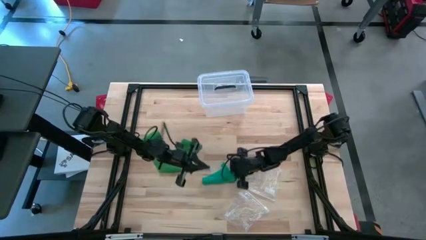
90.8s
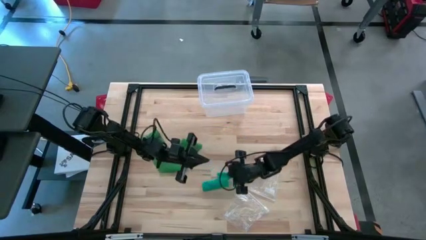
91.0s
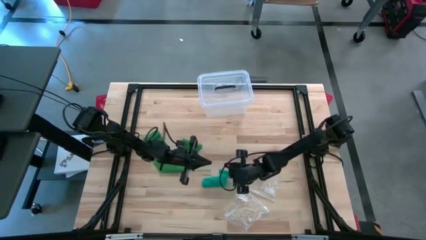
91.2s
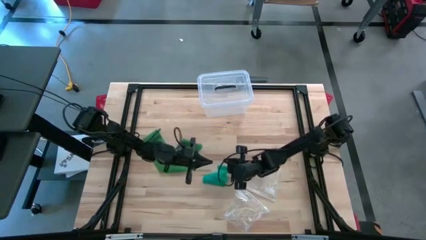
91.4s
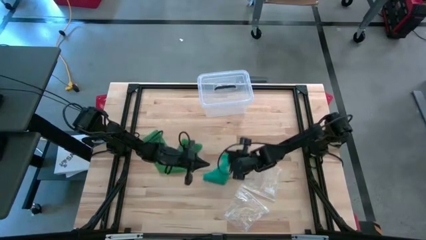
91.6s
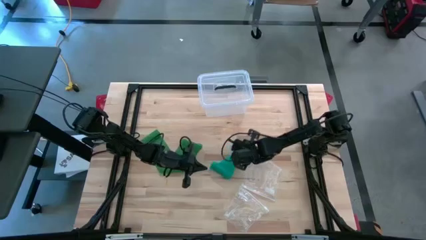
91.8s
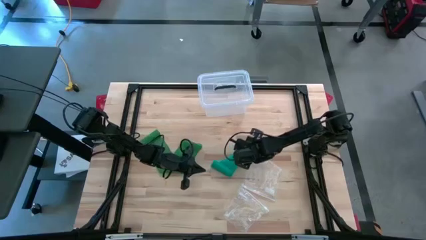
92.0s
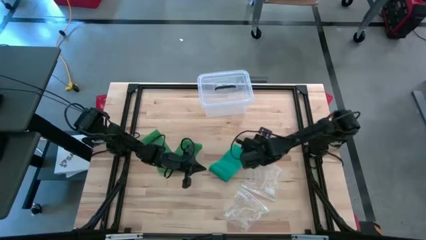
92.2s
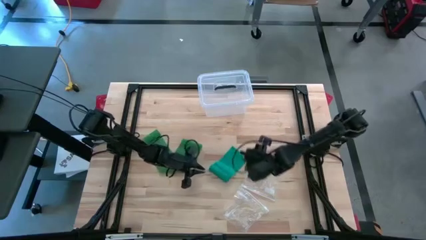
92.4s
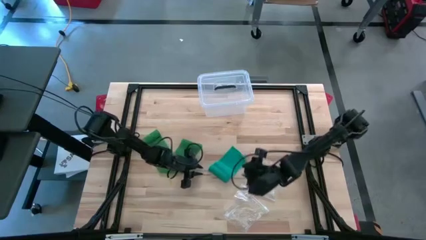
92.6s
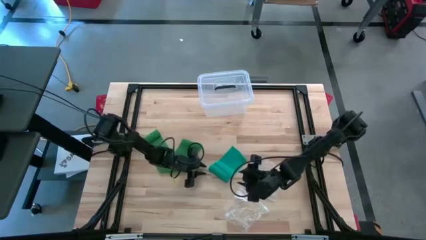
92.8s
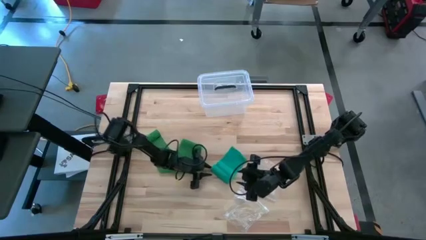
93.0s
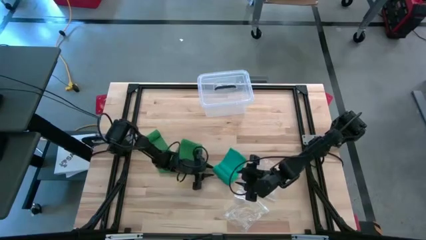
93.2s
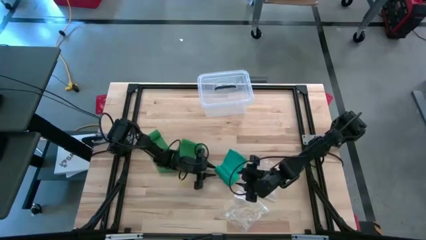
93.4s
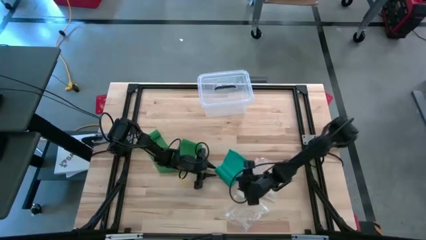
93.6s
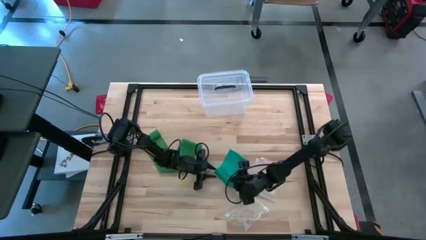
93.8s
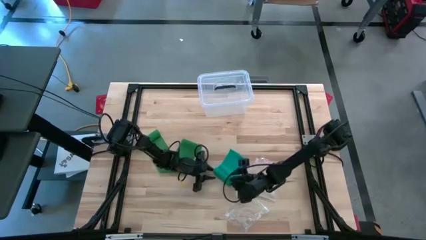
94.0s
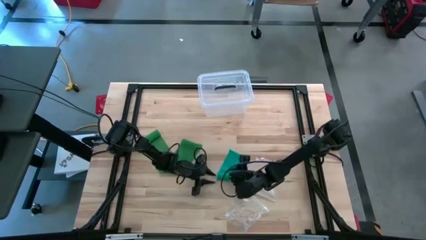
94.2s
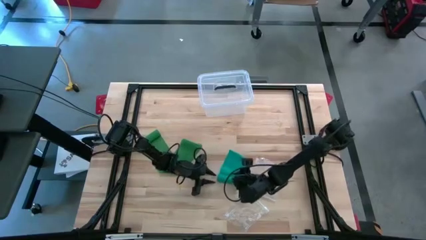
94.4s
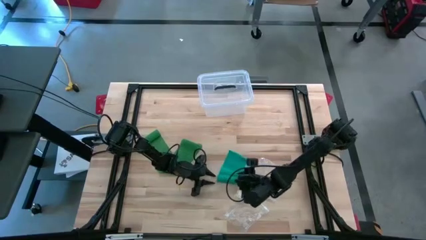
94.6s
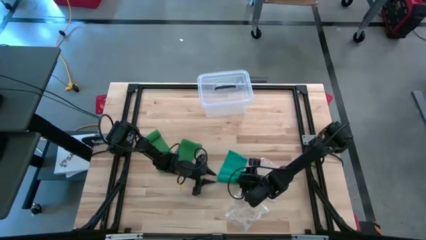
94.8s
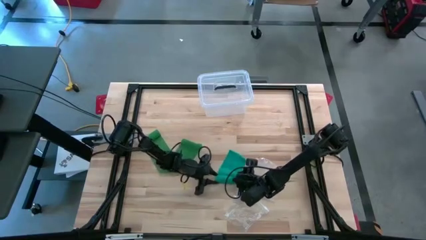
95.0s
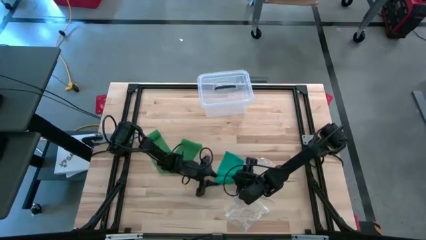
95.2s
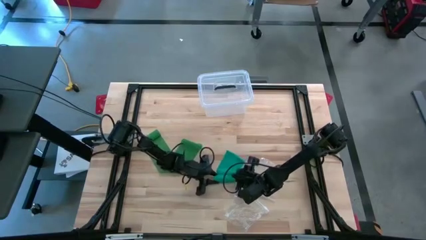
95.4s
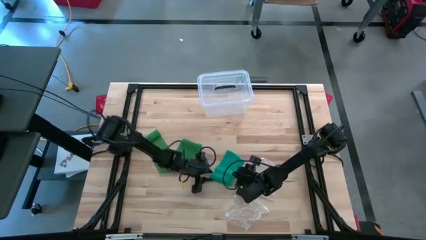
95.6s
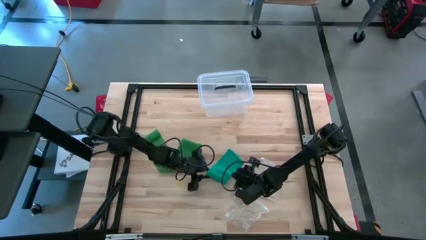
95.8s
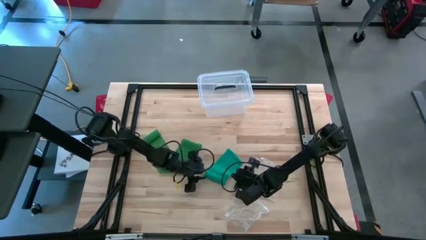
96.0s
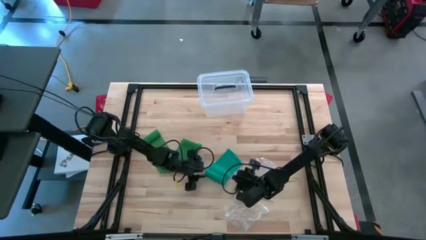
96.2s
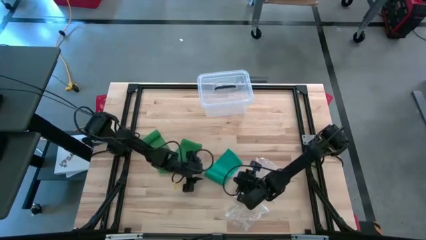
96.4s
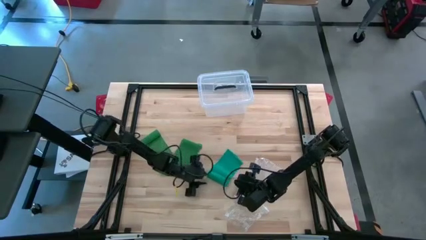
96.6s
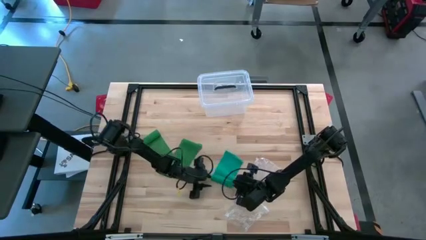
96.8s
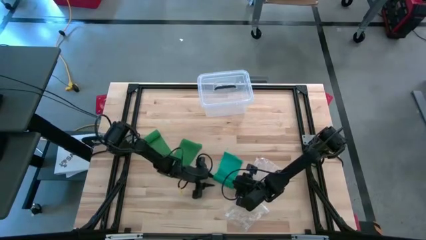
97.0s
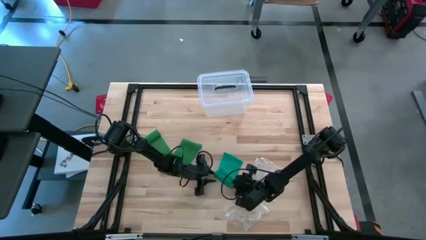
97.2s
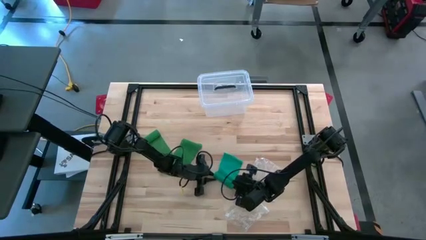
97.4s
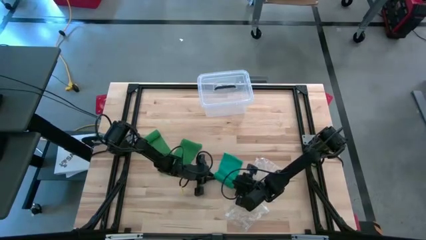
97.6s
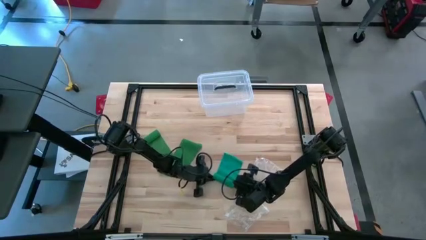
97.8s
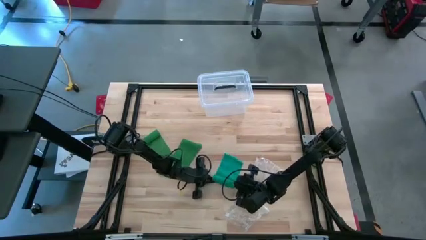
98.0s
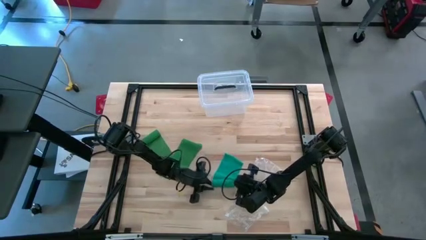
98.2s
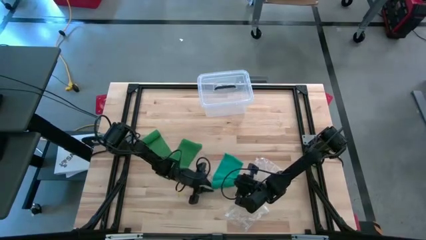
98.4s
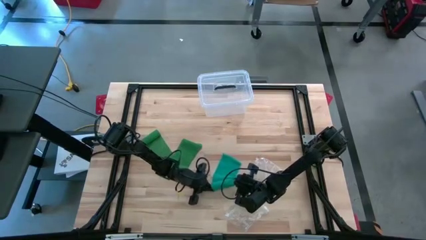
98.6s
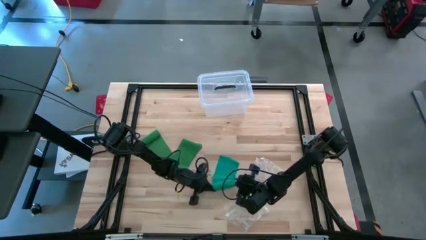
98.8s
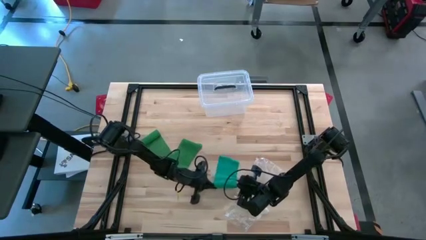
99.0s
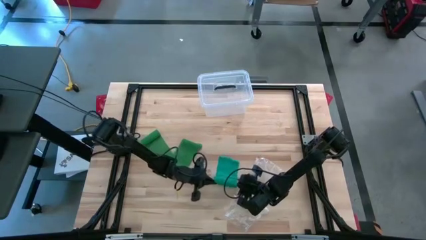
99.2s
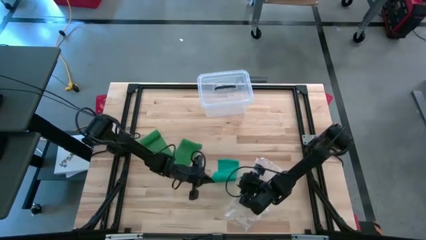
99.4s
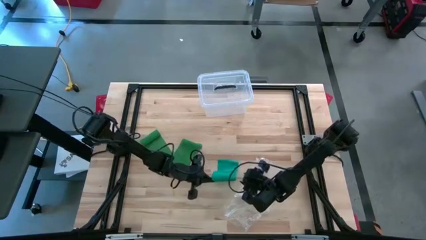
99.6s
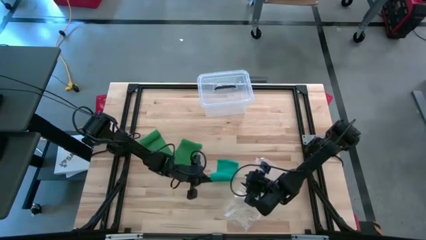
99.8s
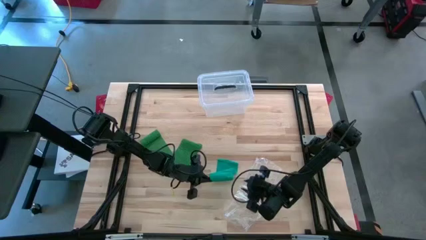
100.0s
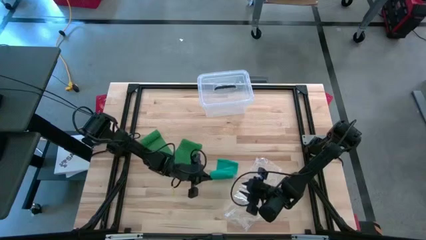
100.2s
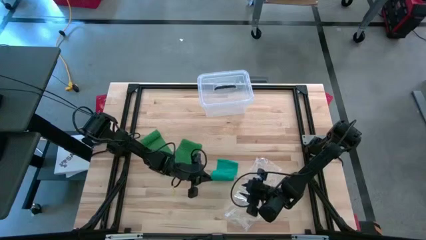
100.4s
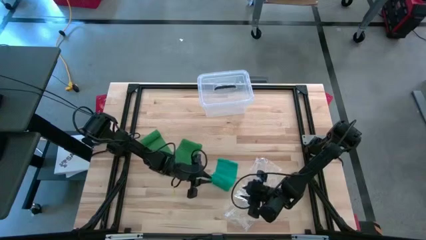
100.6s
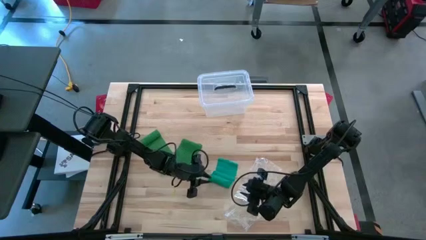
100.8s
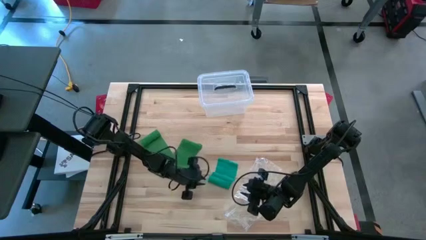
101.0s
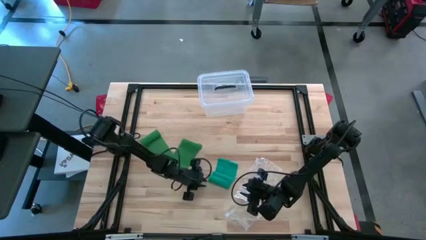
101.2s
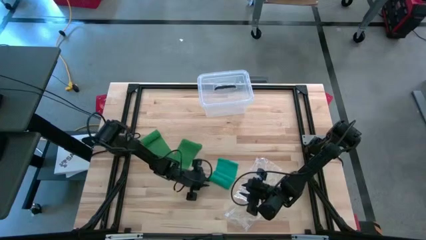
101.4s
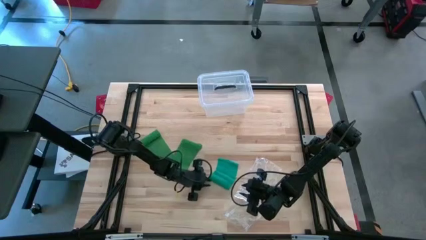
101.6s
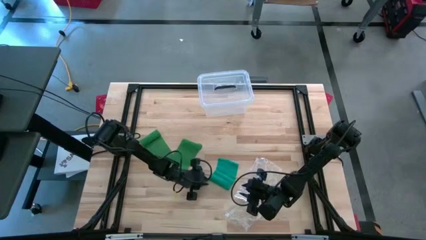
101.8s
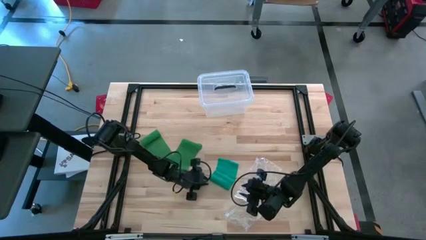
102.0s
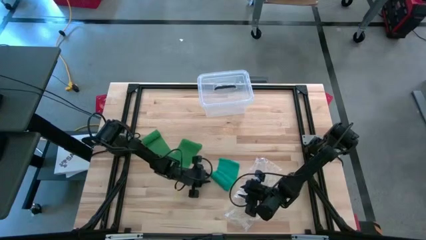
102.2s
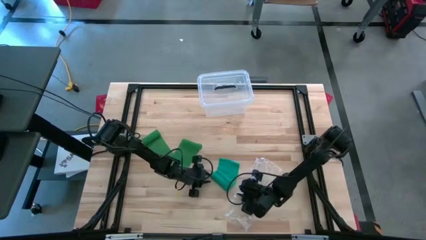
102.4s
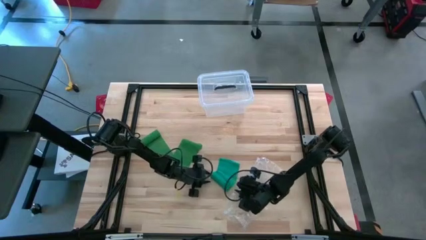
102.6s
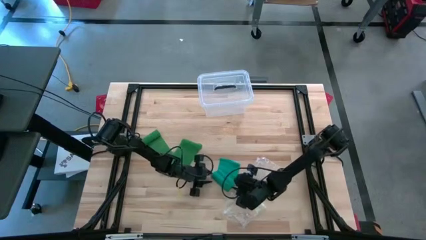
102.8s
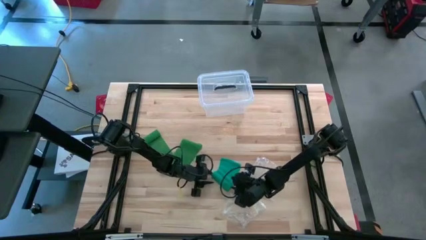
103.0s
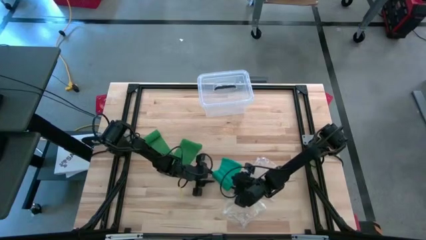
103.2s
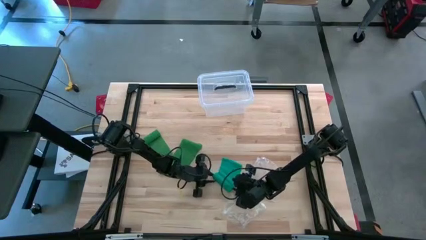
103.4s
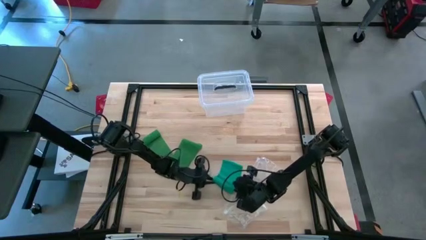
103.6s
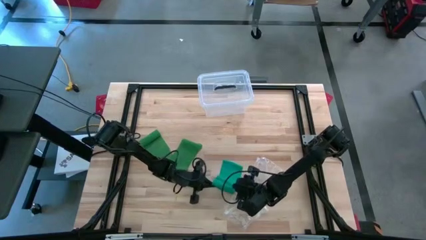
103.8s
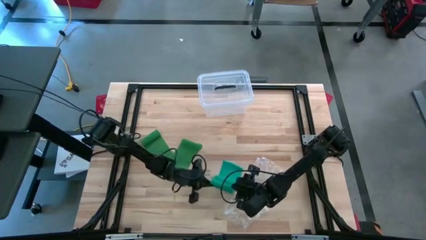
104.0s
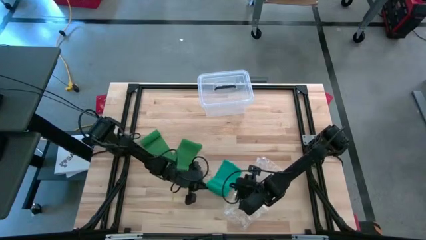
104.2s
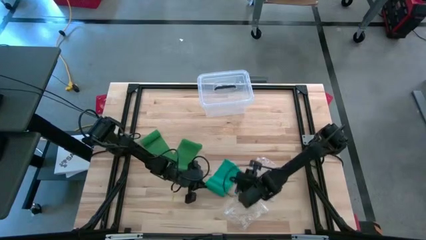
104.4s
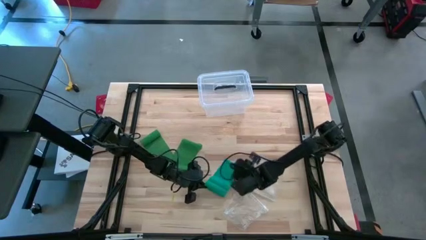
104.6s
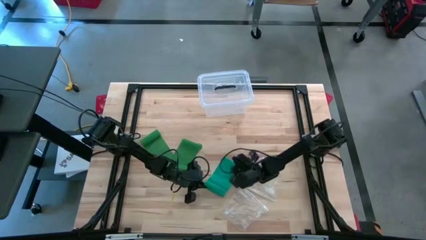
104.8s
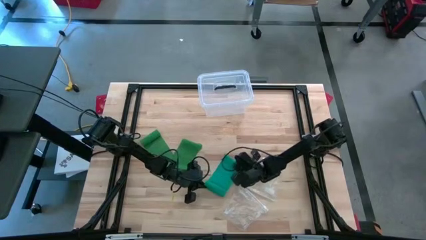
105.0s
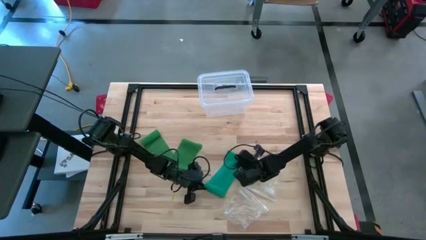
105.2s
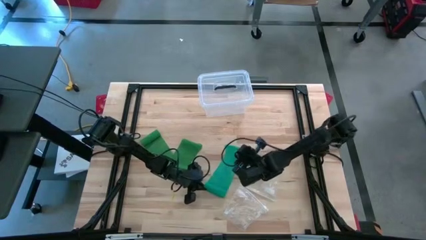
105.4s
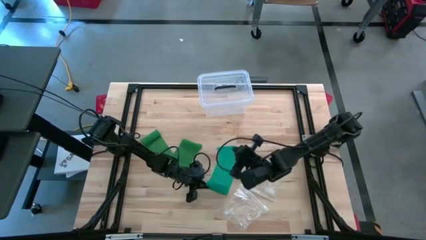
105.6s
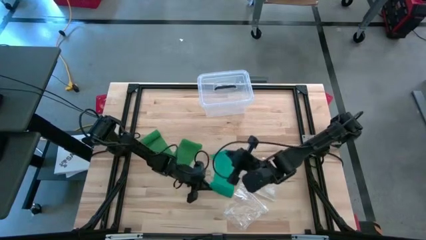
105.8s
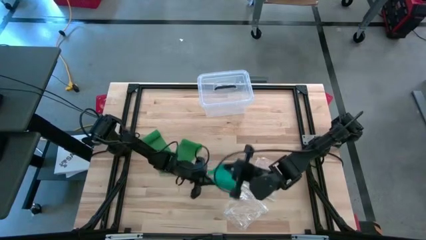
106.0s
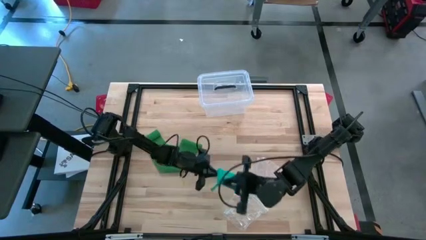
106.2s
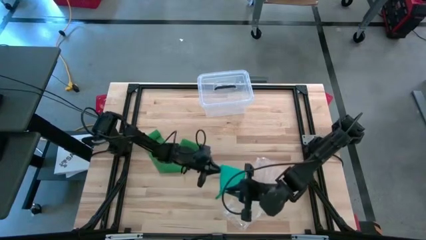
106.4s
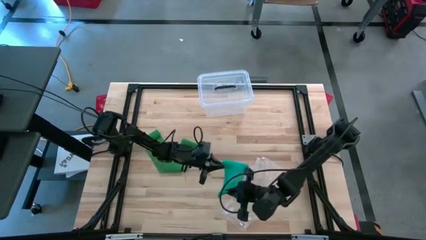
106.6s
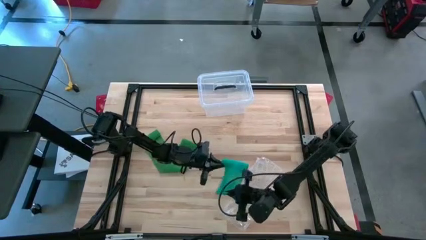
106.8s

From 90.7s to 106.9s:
Task: Roll bandage
Roll the blue bandage

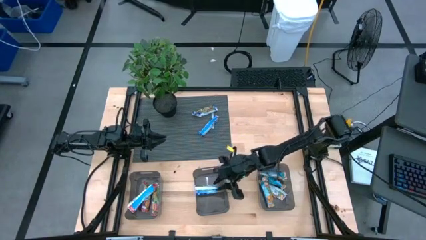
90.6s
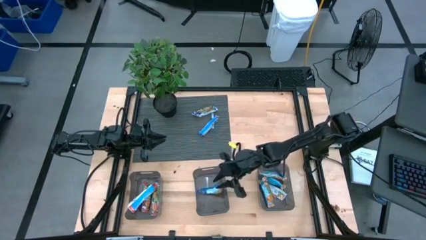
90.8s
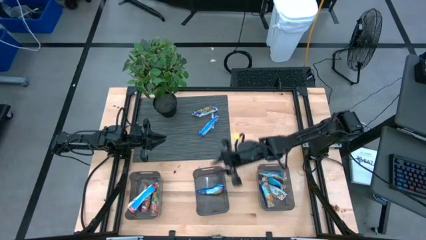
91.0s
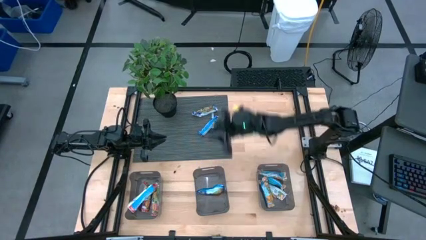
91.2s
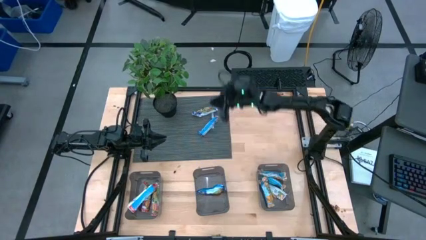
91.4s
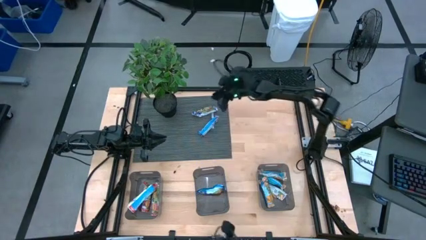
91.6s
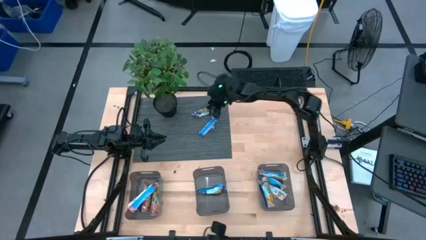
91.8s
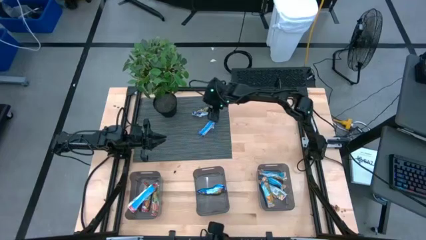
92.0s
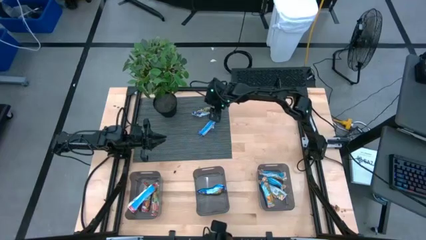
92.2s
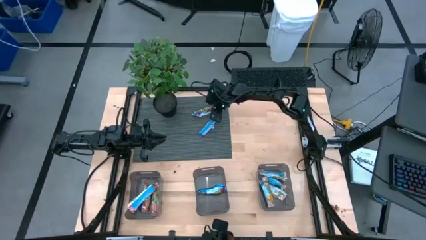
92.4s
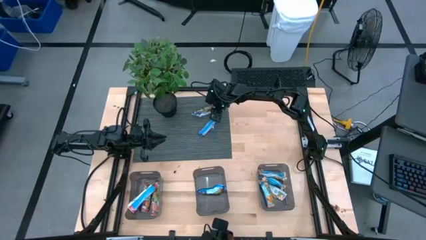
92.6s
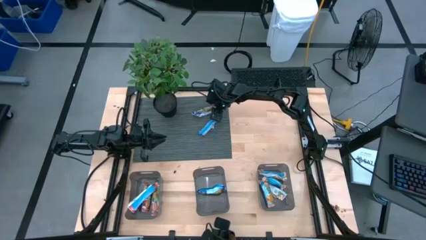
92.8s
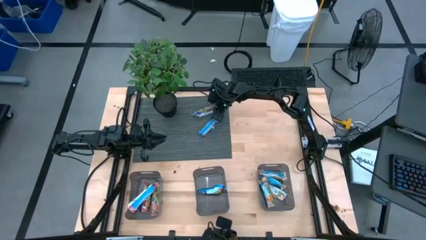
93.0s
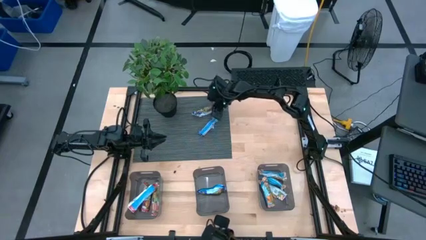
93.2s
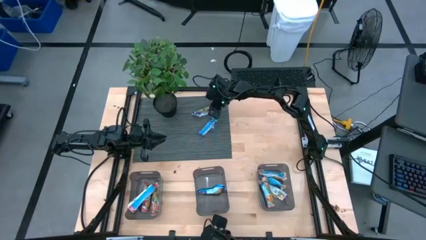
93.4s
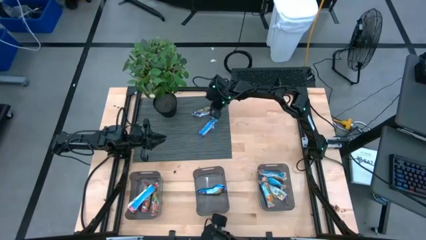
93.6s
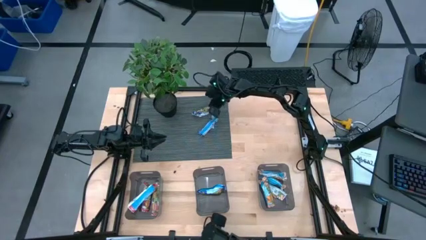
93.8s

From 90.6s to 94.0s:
Task: Pick and place Granola Bars by type
Put the blue granola bar into the middle black bin
